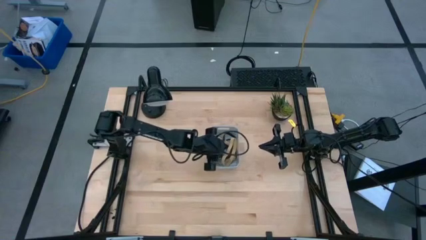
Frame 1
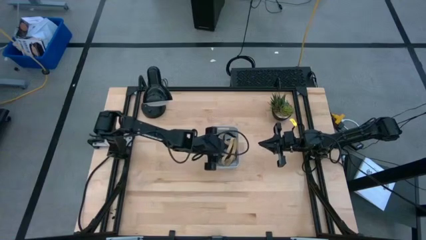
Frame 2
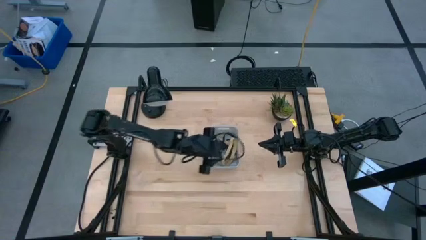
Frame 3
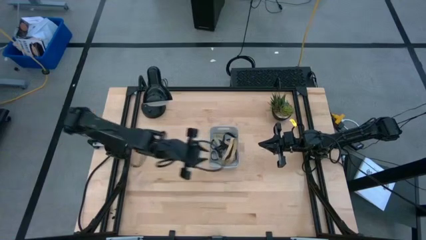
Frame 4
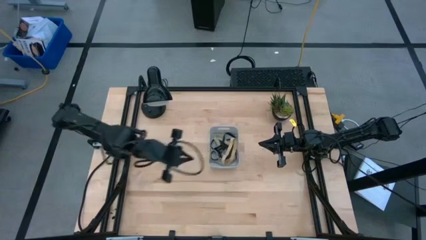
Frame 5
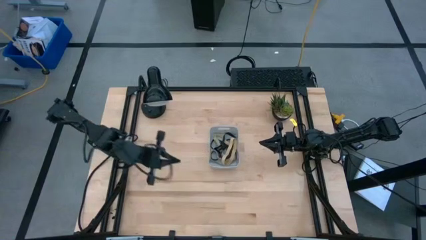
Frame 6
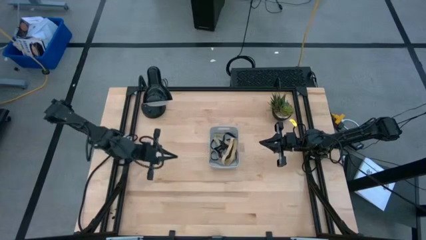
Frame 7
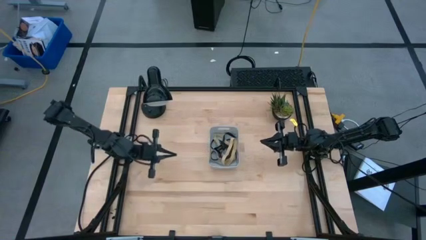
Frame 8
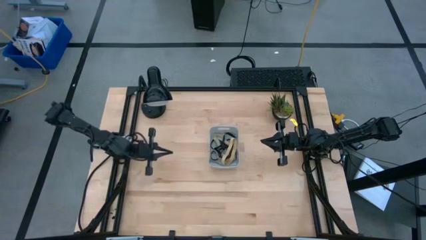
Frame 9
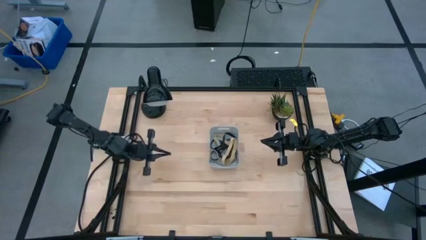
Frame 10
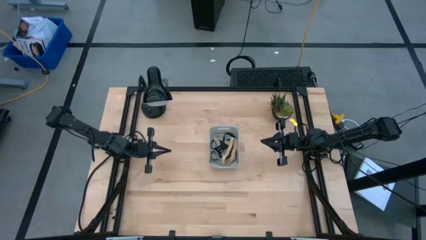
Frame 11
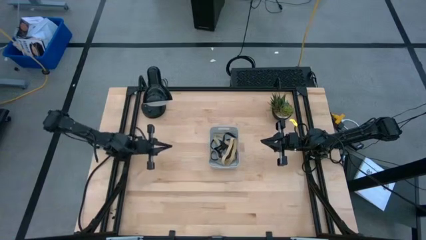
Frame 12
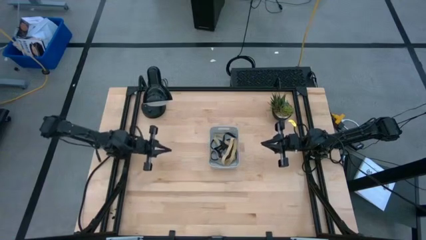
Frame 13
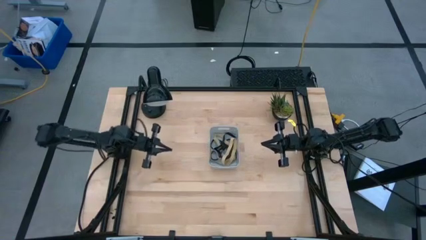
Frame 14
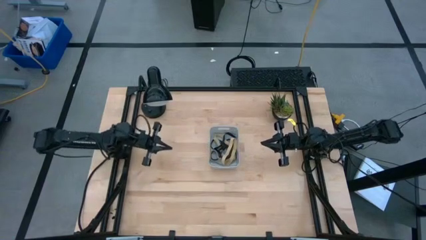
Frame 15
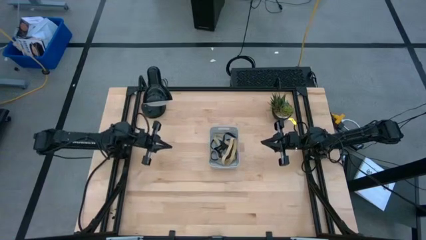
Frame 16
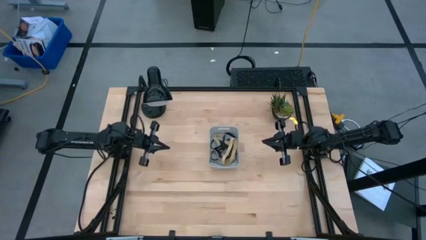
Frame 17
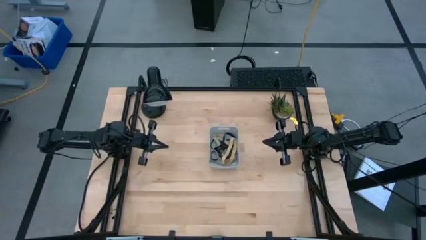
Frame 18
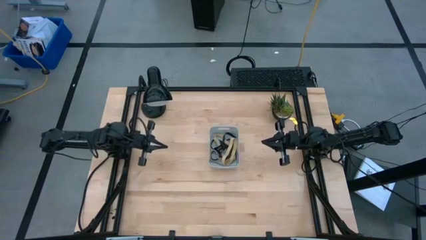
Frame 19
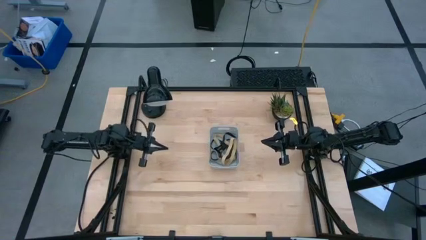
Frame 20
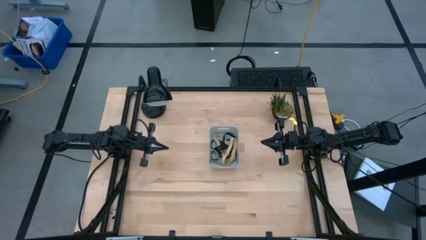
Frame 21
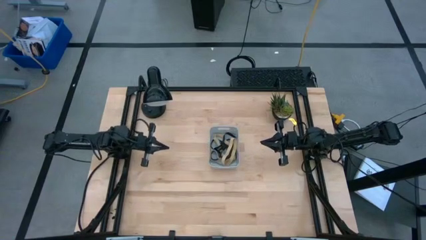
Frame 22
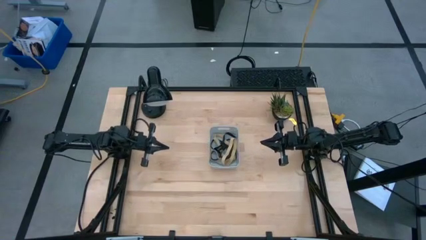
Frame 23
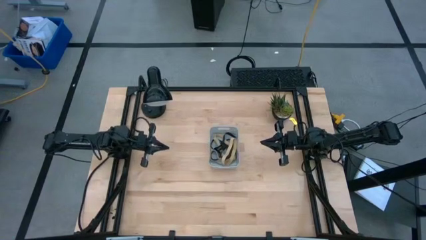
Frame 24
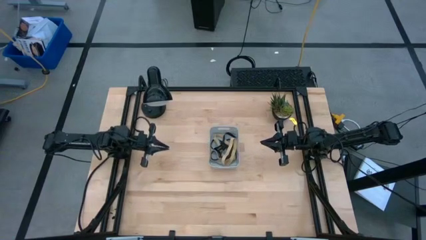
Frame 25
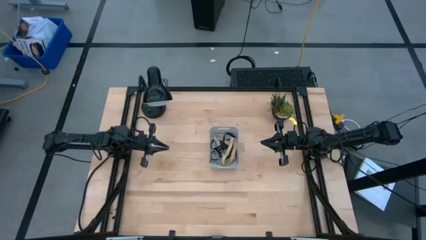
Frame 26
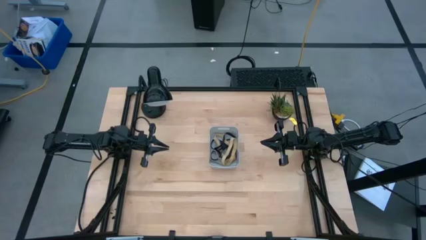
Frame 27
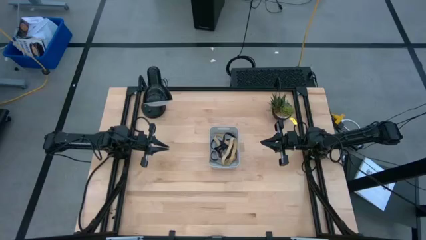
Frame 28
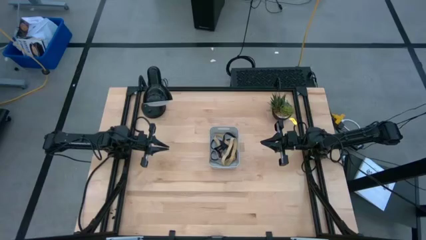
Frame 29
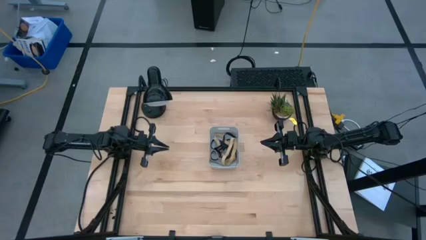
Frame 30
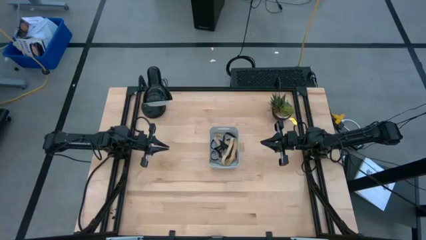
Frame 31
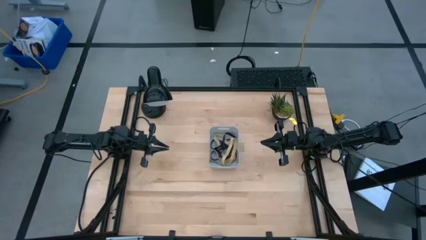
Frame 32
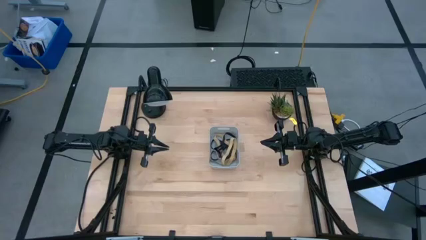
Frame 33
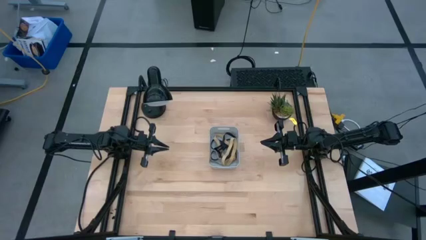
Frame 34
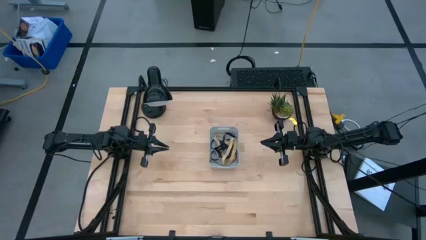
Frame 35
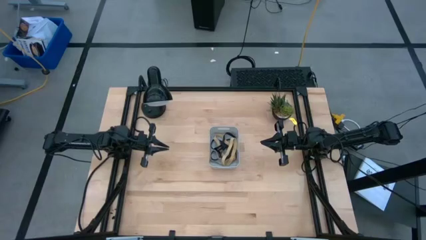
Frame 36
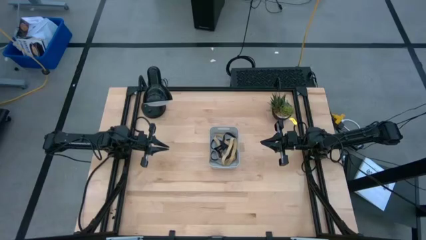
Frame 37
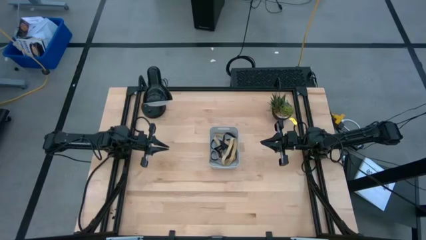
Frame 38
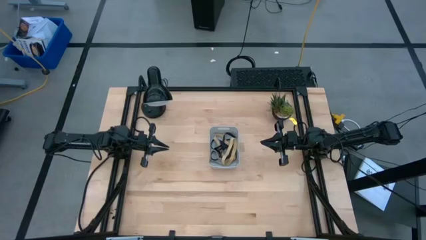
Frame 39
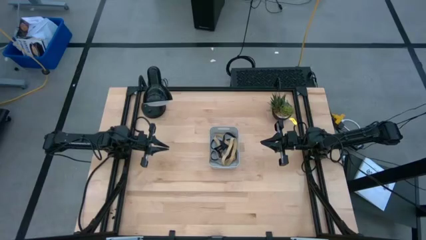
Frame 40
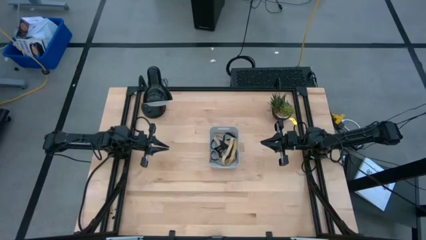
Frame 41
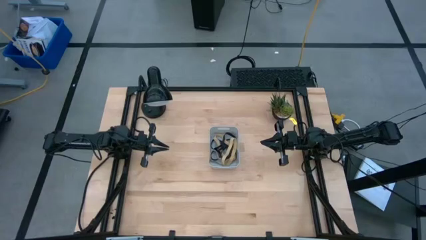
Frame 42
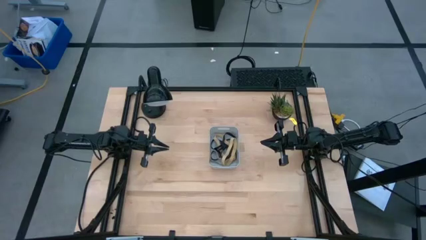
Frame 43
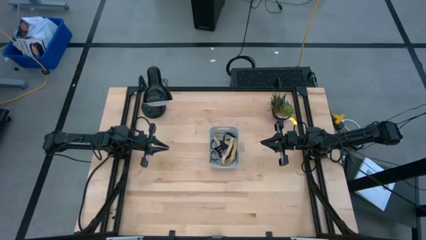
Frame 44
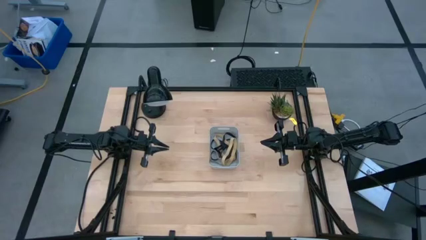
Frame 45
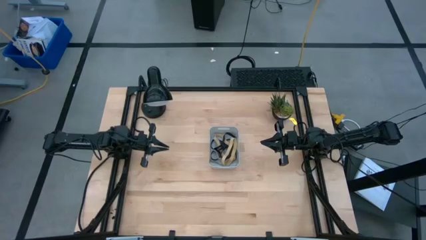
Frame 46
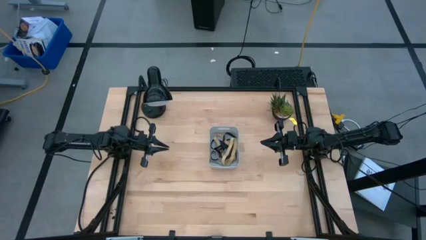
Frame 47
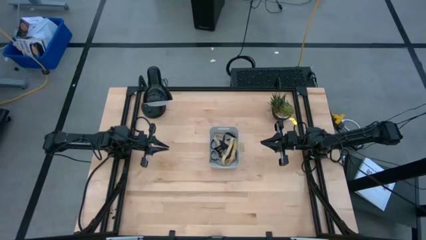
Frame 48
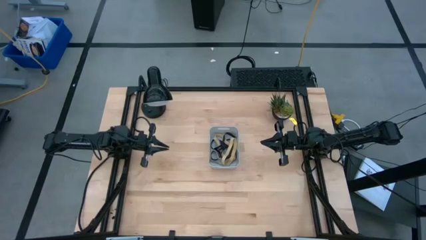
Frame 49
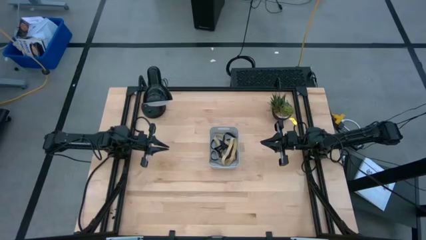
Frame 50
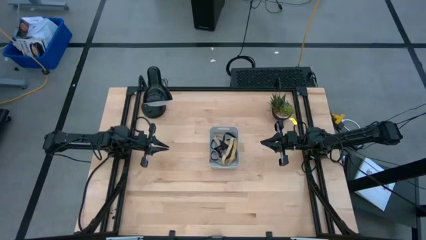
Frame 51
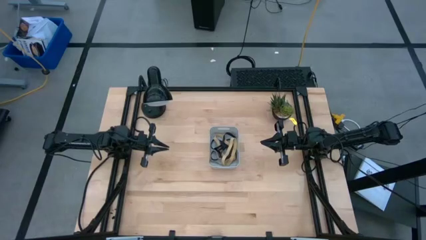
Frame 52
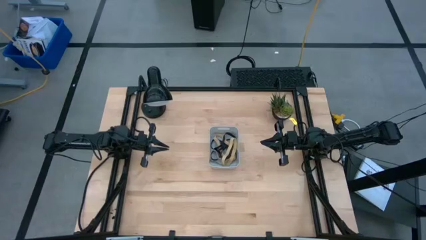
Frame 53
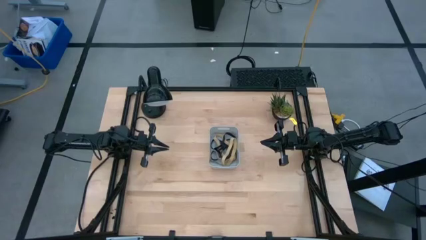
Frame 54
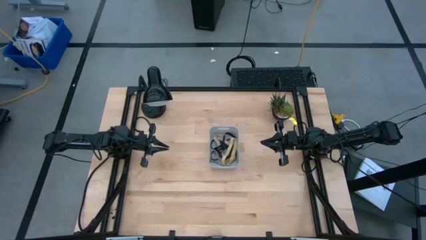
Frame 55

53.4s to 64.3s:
Task: Pick and place rubber bands into bin
Return to Home Position

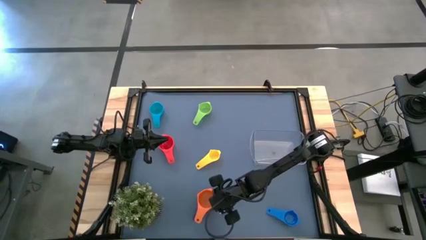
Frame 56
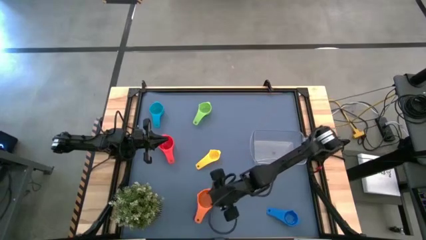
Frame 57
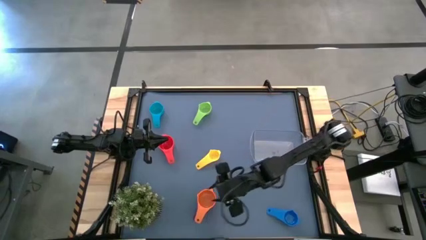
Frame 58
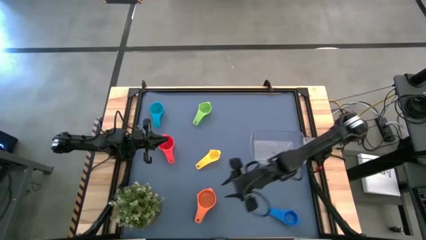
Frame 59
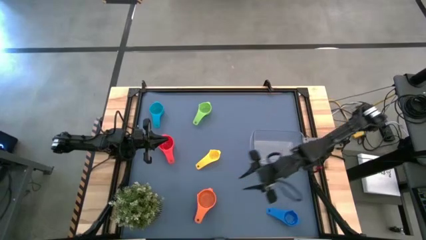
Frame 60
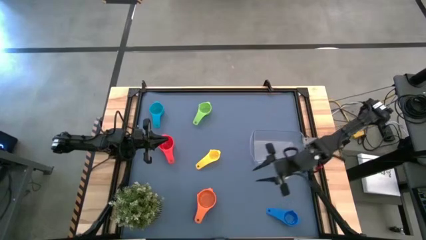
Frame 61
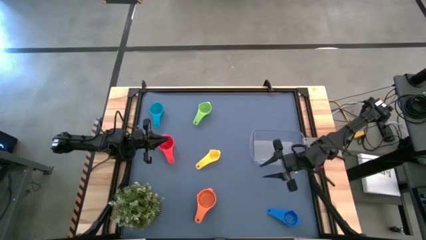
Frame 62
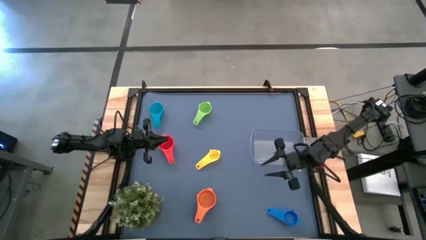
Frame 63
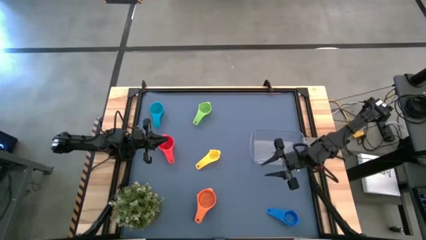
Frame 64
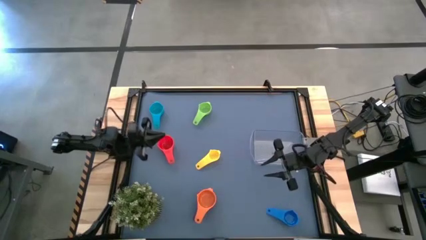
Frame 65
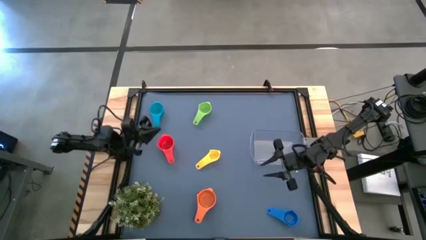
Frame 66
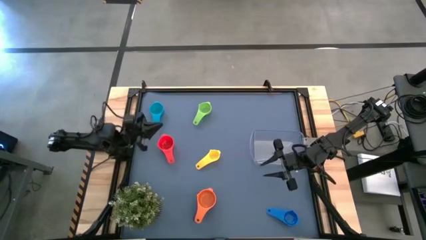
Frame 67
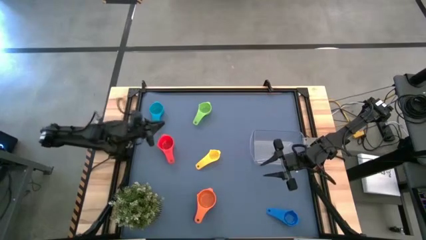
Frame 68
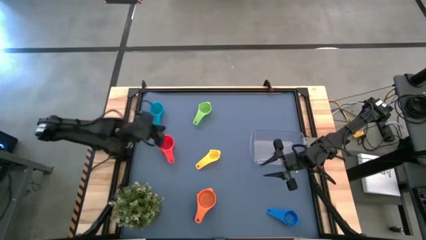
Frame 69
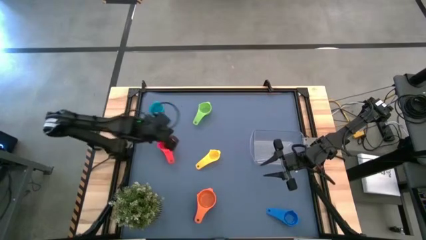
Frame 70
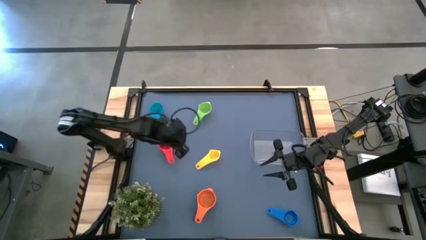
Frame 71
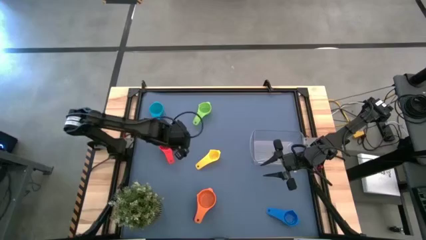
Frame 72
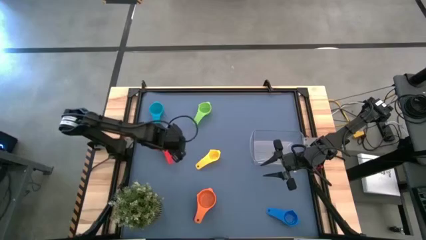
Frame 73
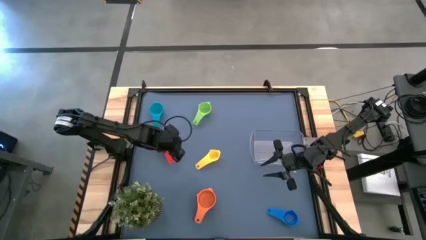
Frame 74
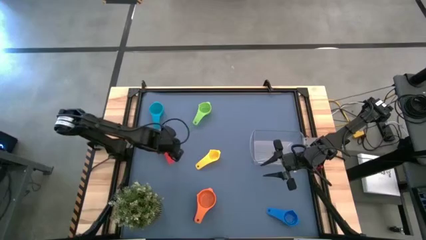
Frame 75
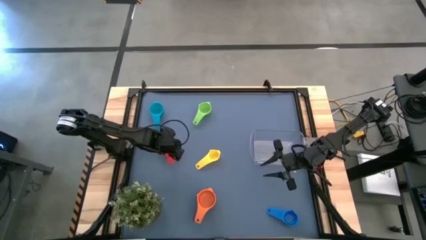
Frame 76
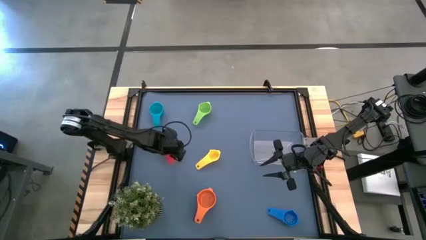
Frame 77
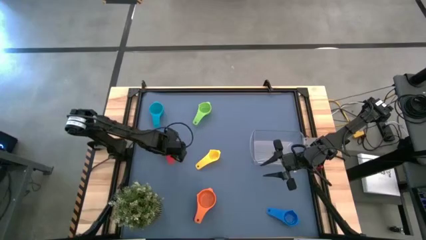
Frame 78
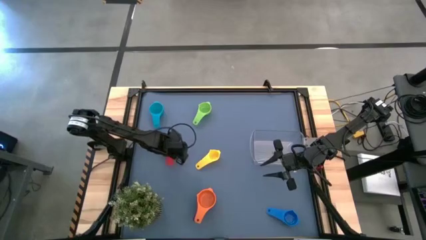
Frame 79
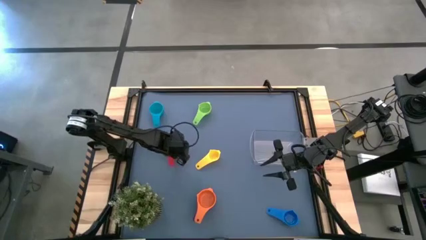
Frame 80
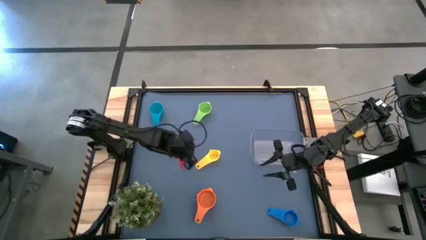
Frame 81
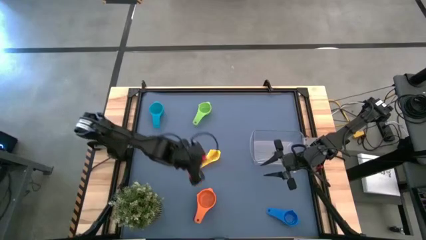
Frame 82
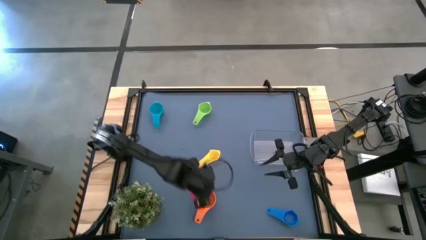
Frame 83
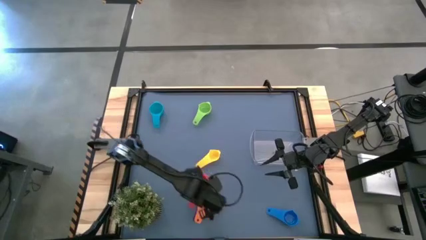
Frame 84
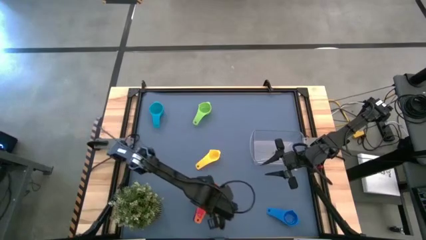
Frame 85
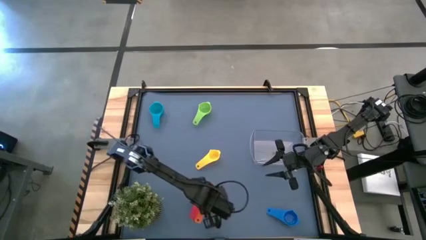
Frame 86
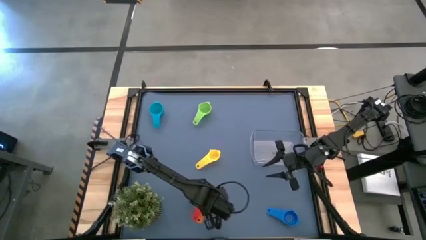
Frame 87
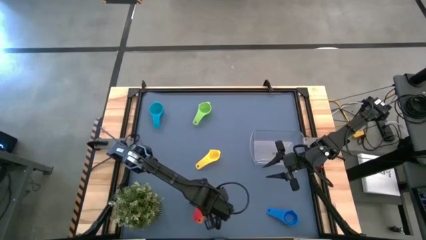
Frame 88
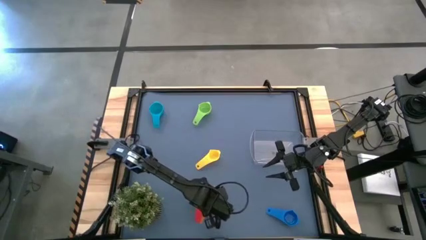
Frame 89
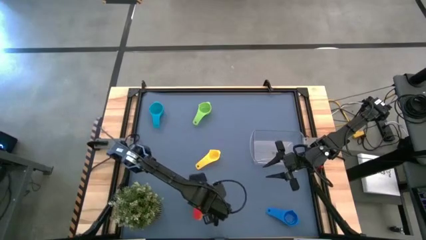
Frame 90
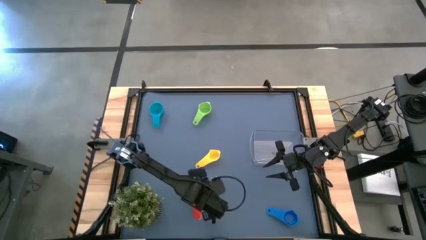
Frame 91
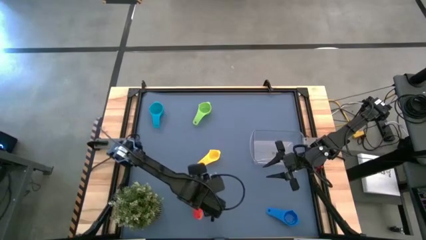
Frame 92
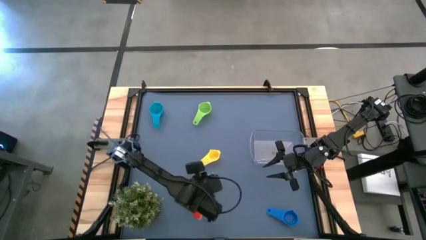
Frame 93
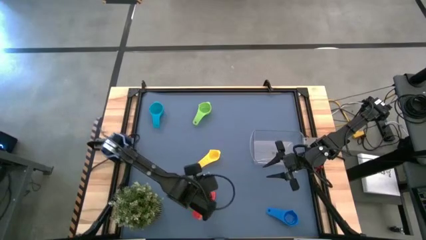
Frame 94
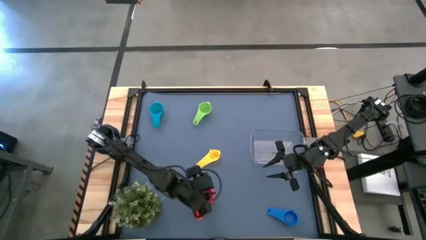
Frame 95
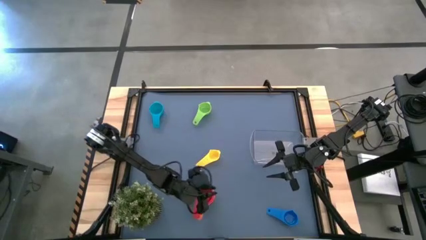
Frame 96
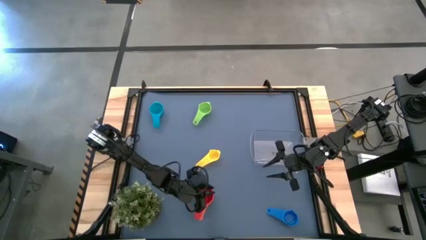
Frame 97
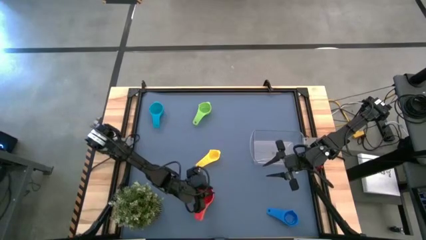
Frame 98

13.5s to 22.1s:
Task: Nest measuring cups in basket
Stack the red measuring cup on top of the orange measuring cup
